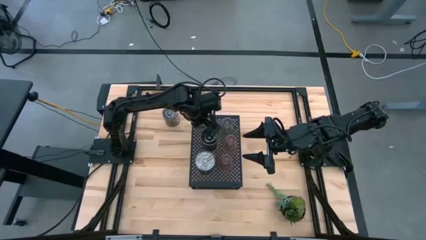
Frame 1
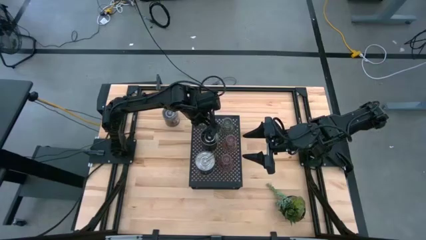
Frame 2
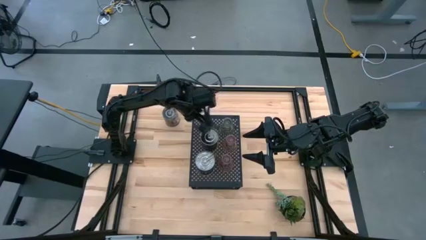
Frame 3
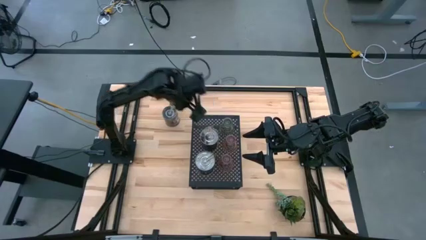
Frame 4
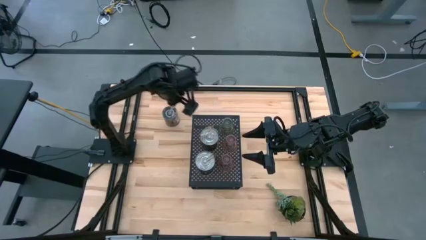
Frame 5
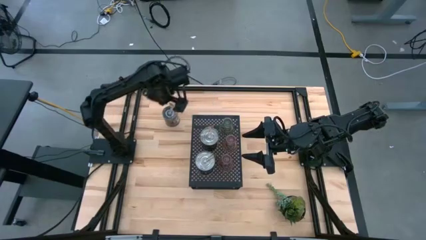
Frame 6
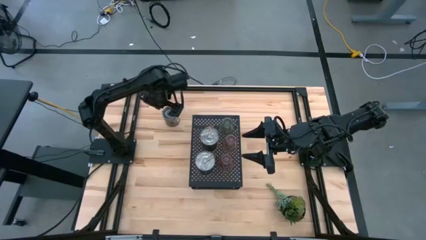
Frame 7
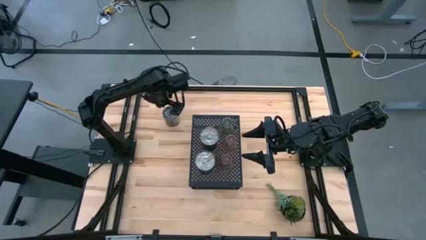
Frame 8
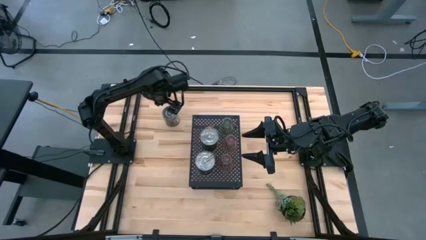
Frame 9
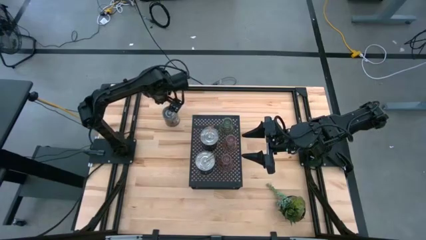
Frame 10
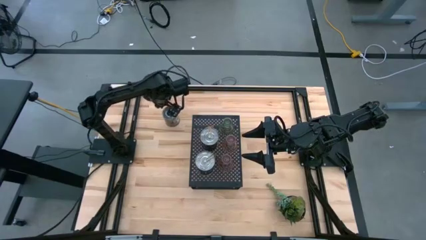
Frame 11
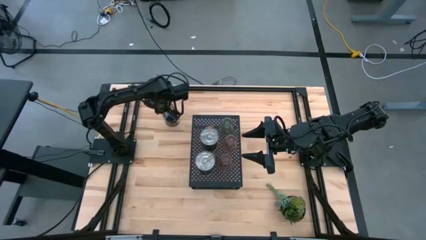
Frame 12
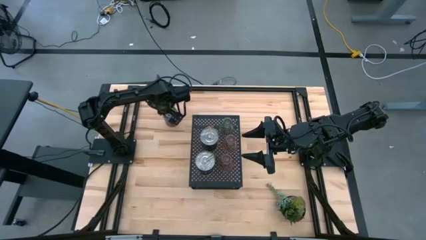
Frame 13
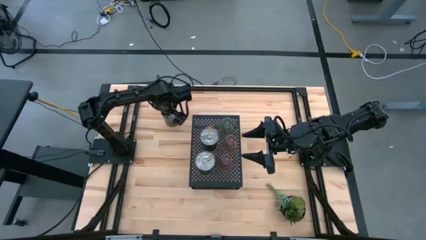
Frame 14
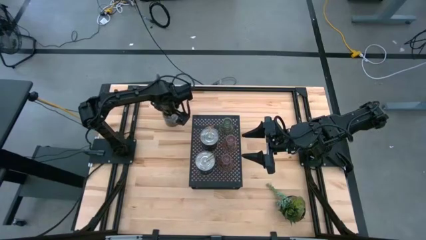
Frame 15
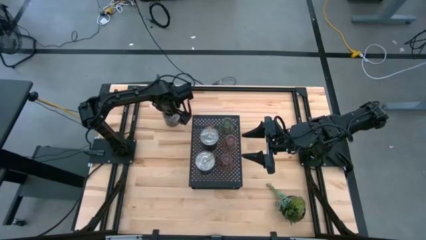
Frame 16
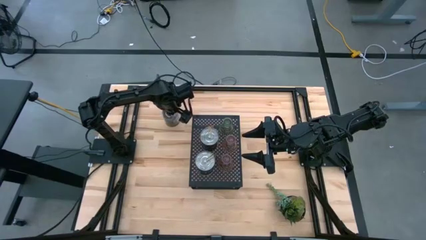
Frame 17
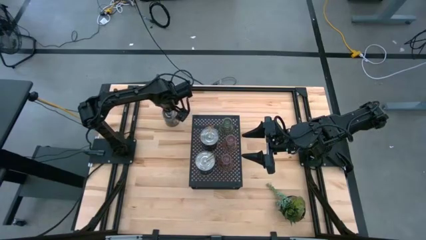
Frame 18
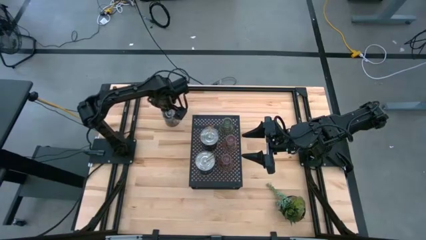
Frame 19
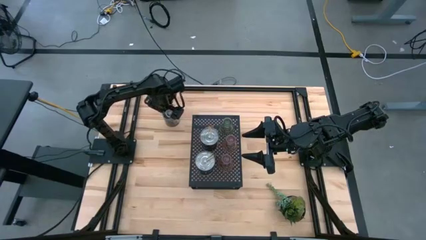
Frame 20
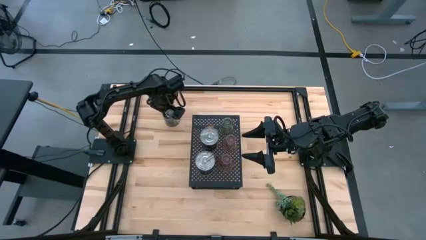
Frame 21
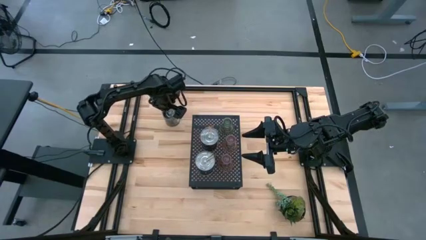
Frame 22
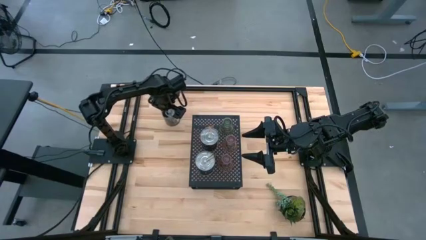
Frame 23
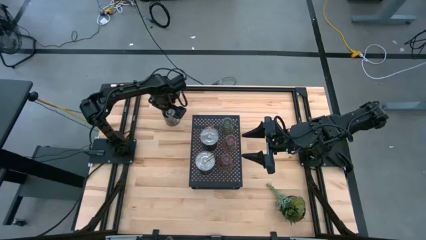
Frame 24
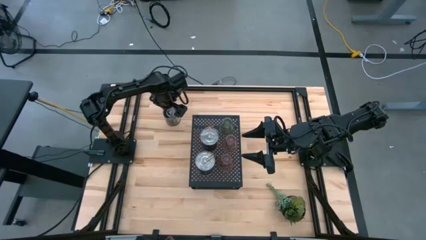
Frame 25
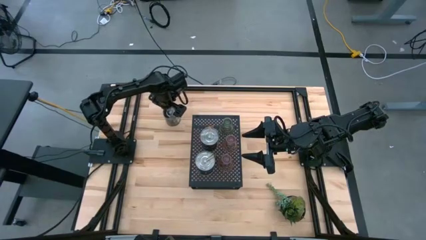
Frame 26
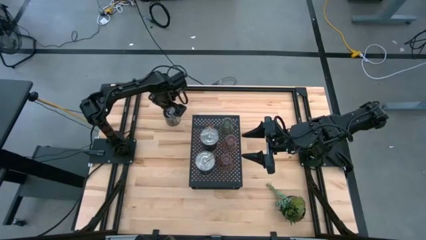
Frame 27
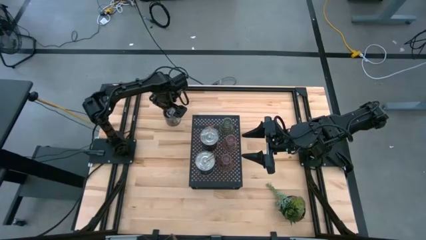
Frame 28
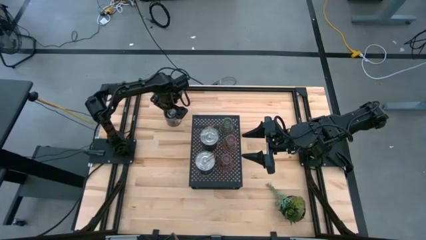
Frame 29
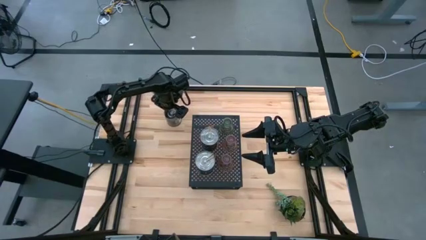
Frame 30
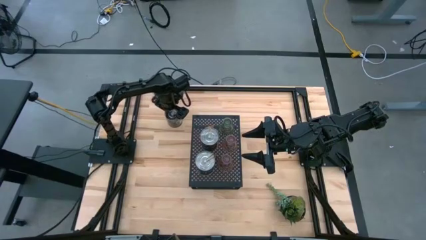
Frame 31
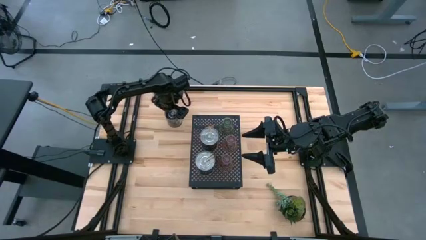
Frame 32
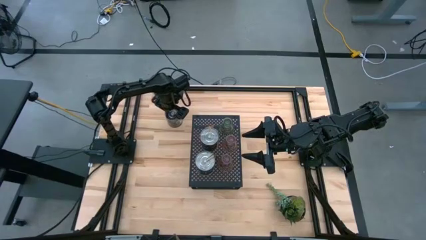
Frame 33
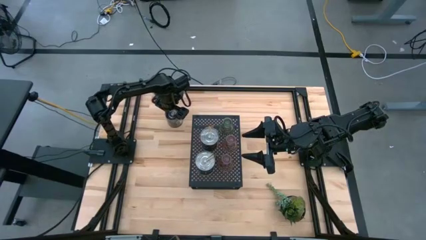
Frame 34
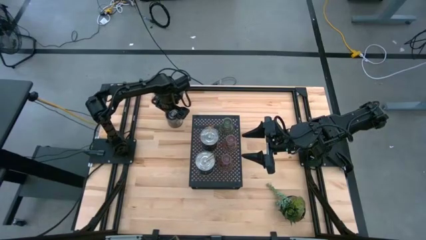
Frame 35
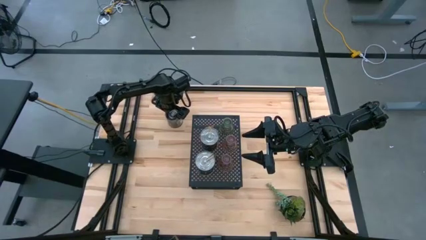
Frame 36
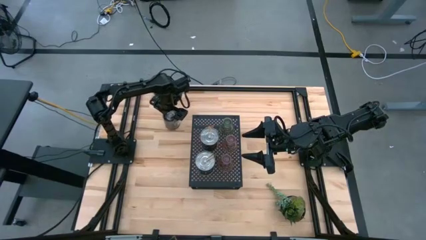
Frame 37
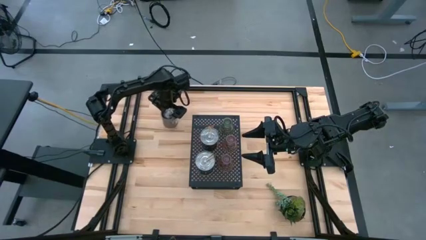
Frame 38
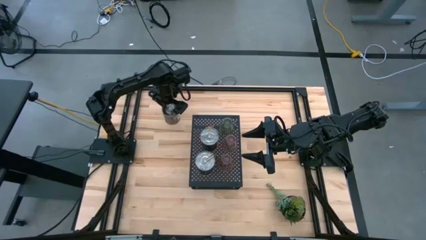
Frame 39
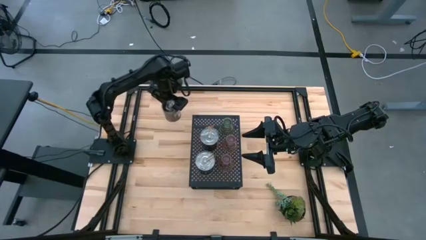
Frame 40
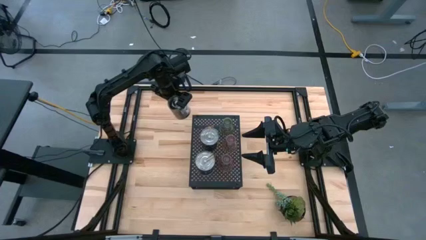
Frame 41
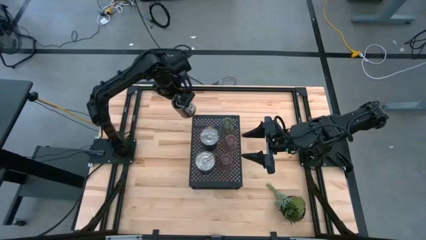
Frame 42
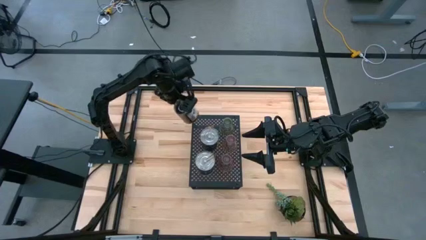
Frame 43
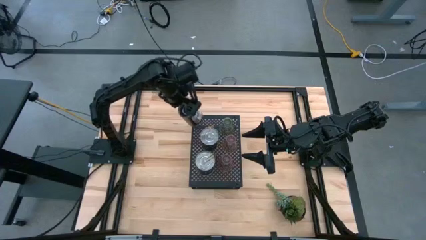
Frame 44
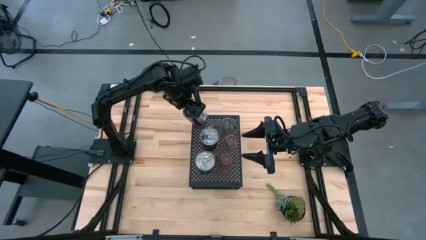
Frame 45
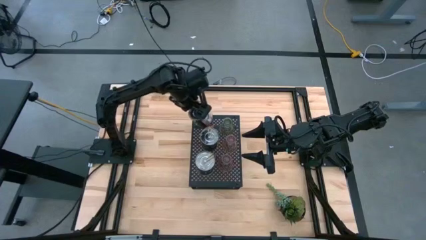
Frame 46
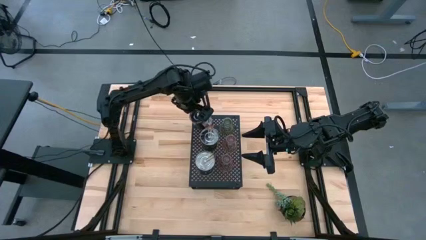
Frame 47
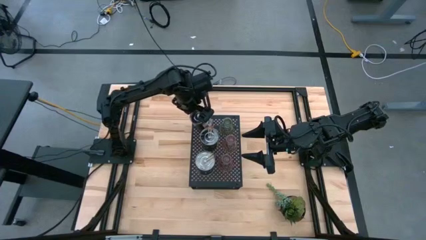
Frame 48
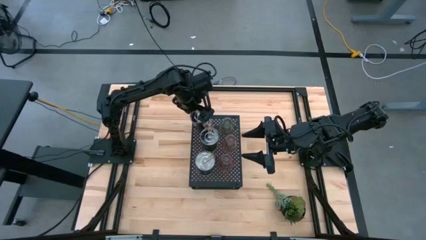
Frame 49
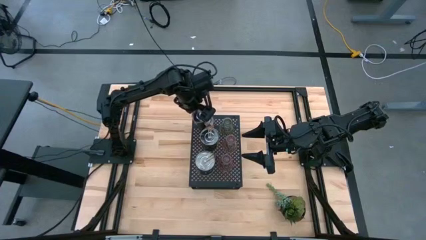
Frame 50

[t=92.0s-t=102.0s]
Task: Pick & Place candle stick holders
Put the silver scented candle on the shelf aligned with the silver scented candles

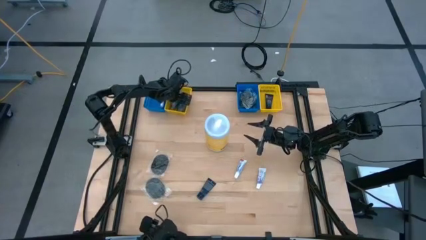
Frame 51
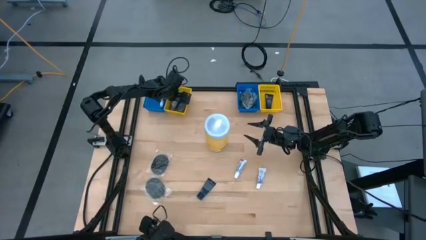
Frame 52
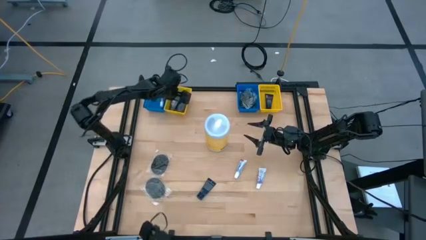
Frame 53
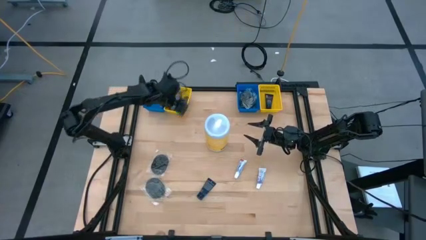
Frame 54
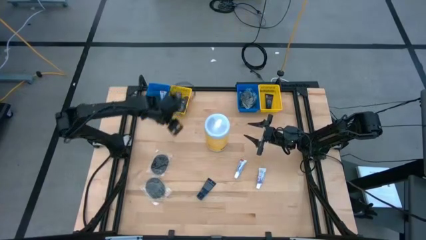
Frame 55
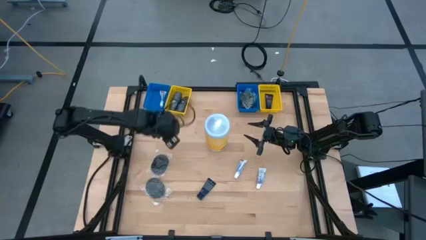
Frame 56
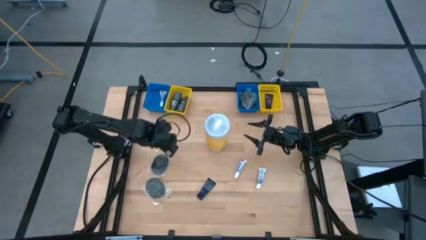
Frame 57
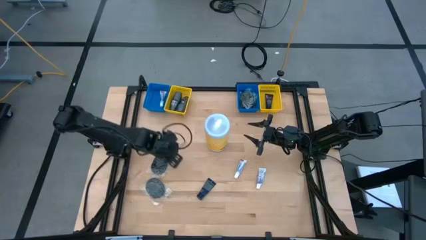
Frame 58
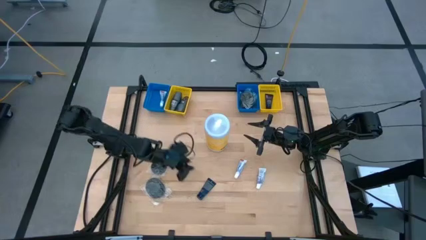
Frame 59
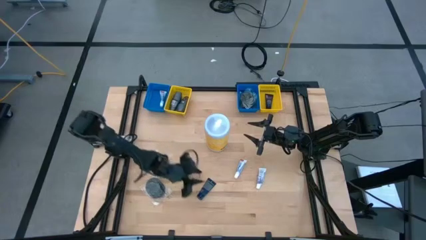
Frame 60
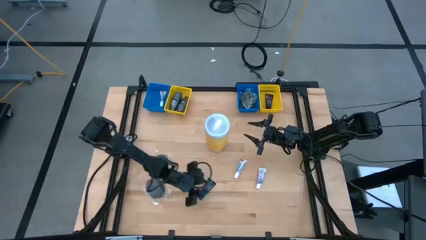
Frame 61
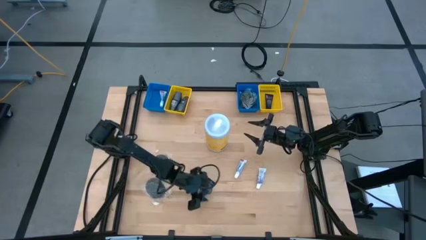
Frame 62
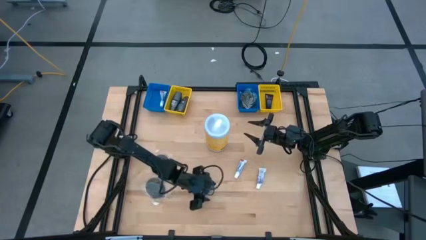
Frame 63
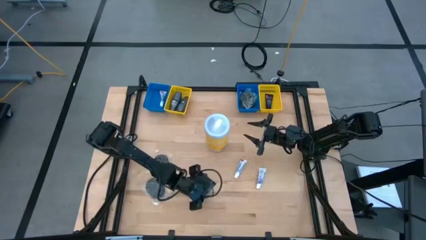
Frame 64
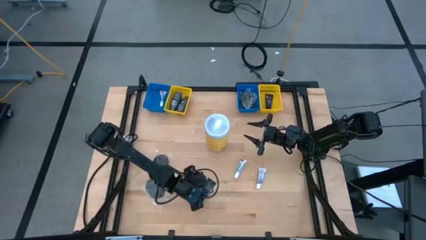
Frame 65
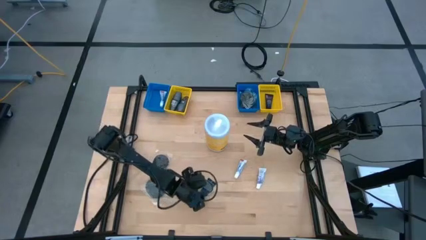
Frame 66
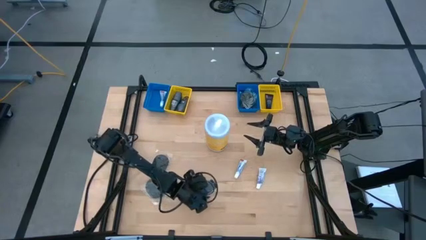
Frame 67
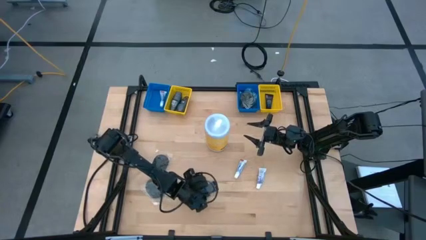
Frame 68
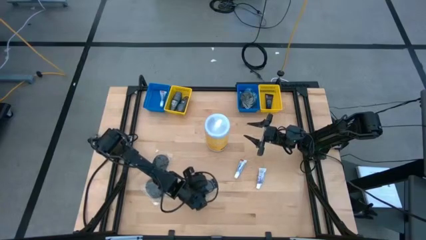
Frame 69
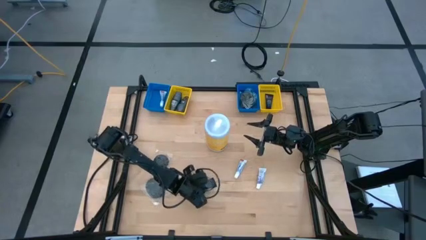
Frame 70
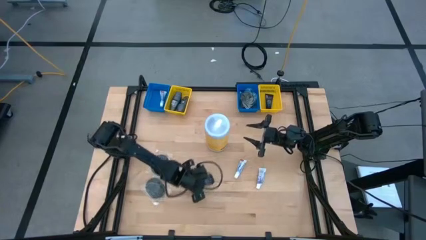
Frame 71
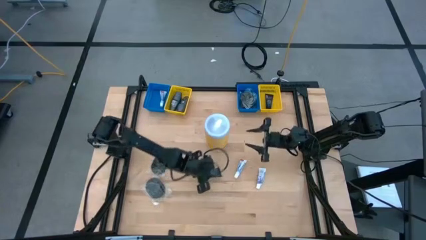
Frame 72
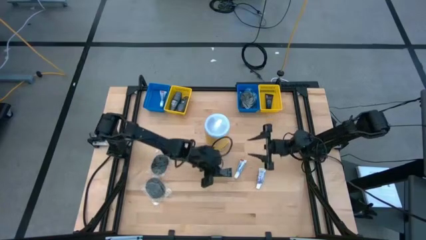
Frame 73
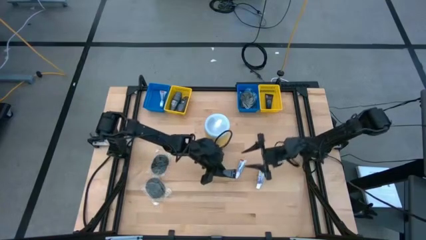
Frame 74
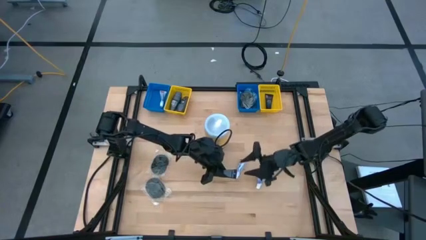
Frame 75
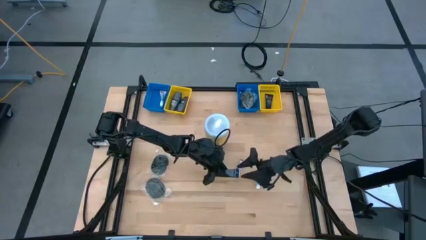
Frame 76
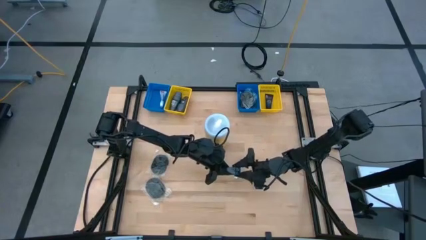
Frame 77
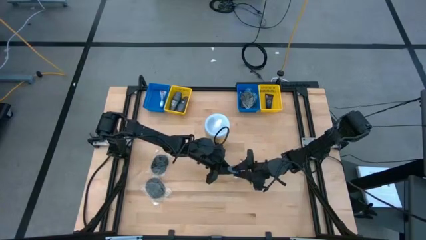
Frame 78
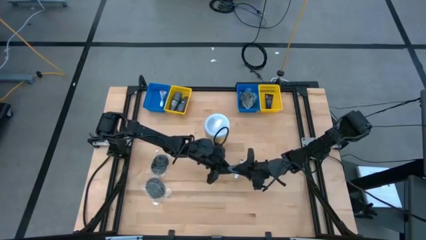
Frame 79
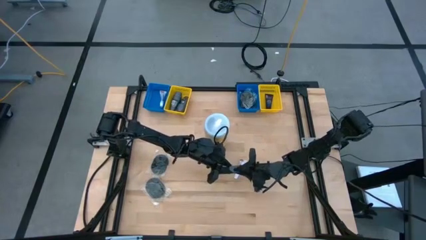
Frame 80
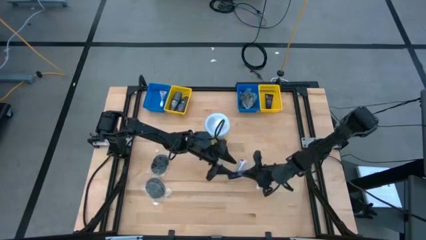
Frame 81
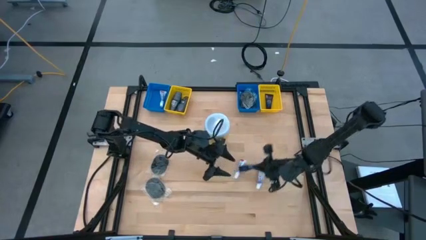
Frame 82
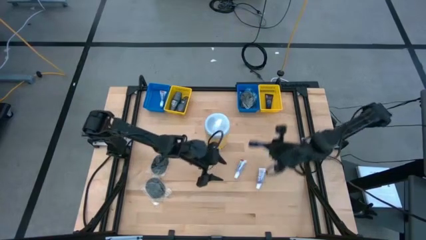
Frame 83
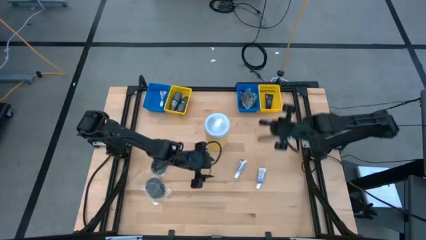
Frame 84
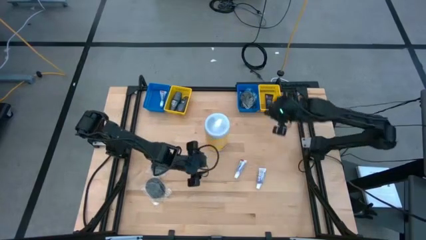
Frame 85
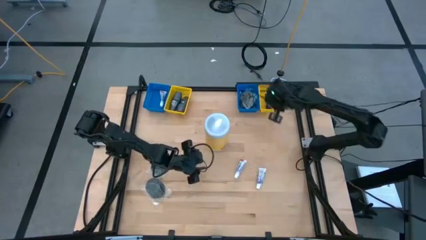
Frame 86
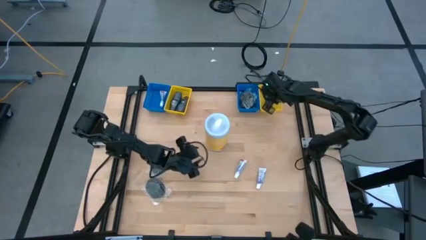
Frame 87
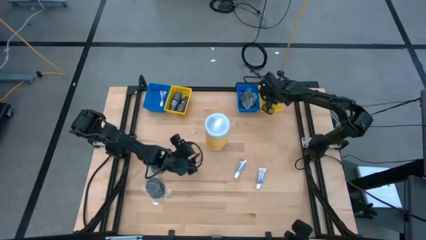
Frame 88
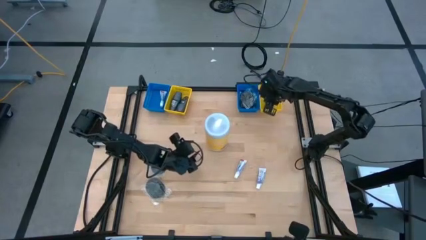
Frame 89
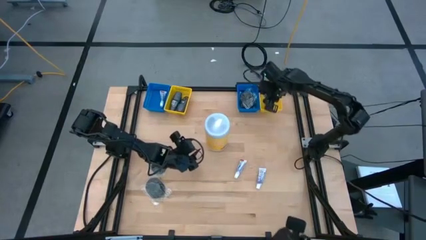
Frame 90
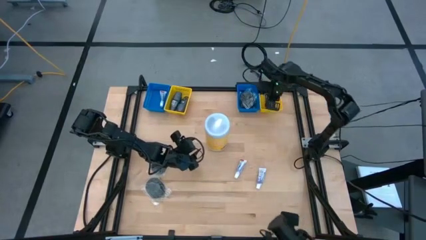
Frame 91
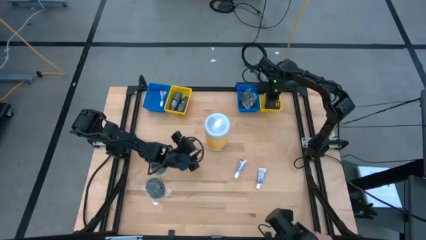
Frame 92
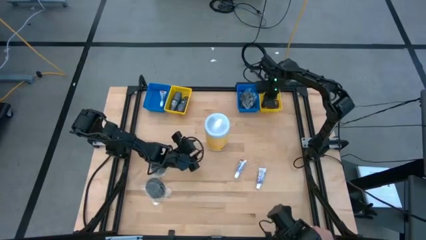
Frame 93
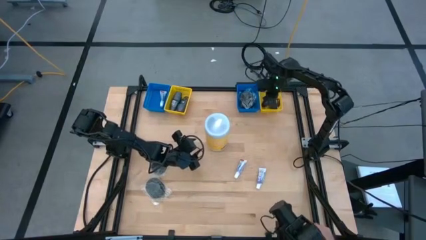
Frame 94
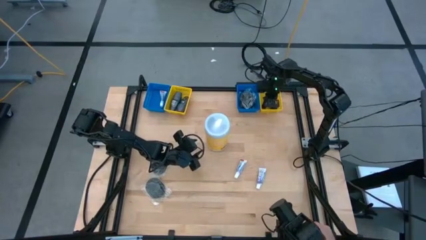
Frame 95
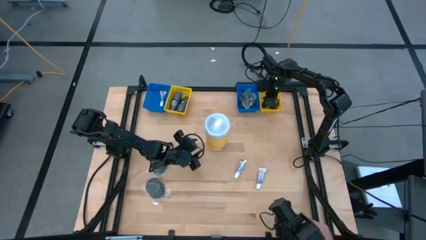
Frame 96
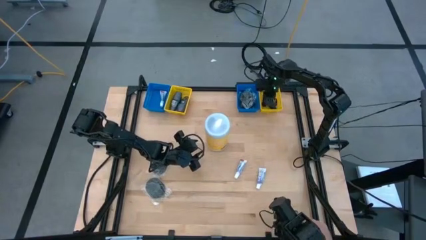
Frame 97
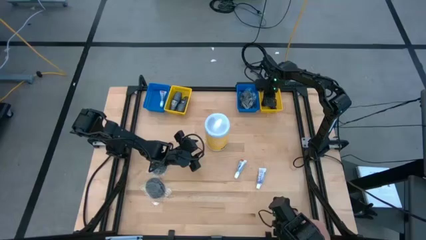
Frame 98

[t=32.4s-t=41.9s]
Task: Pick & Place Travel size toiletries
Put the shave cream into the right yellow bin
